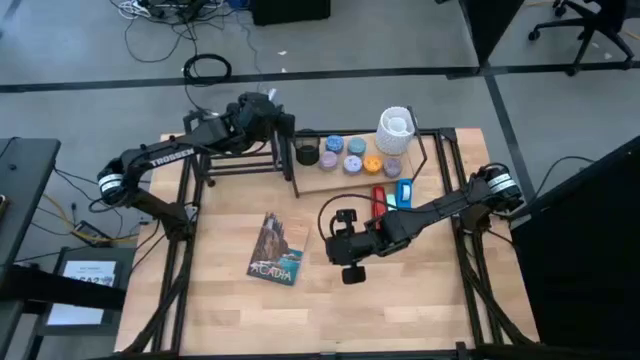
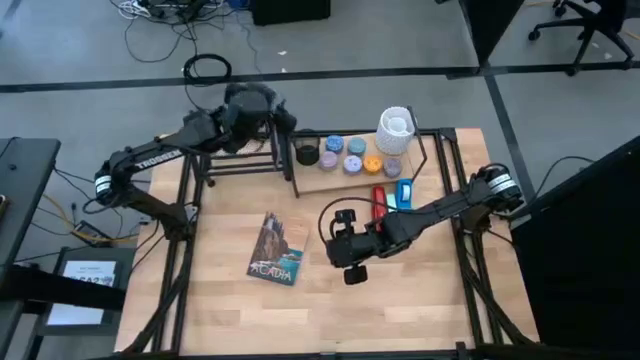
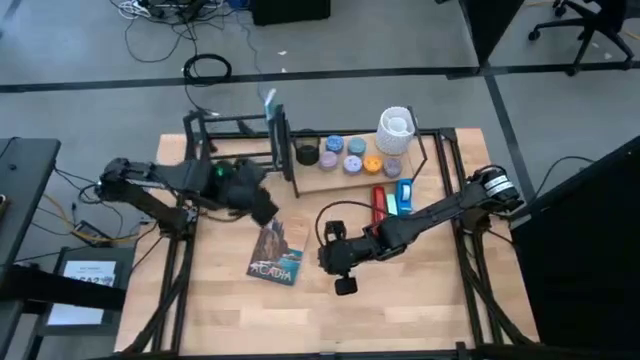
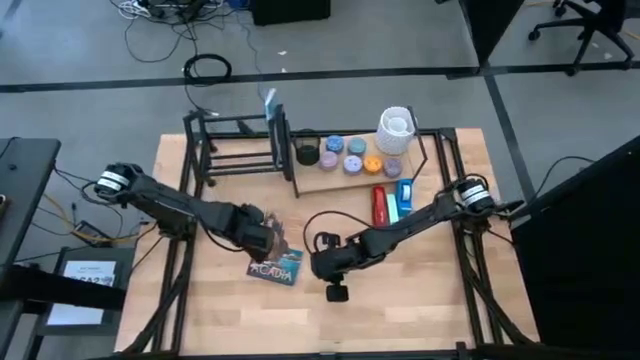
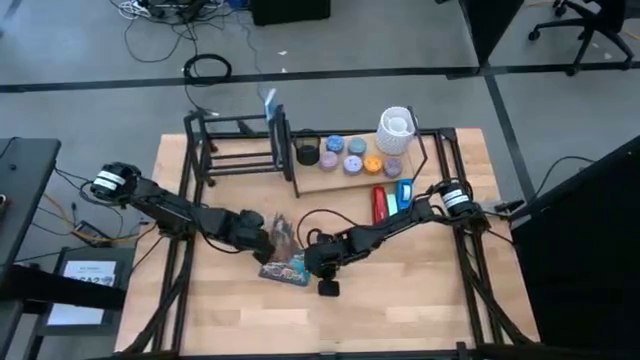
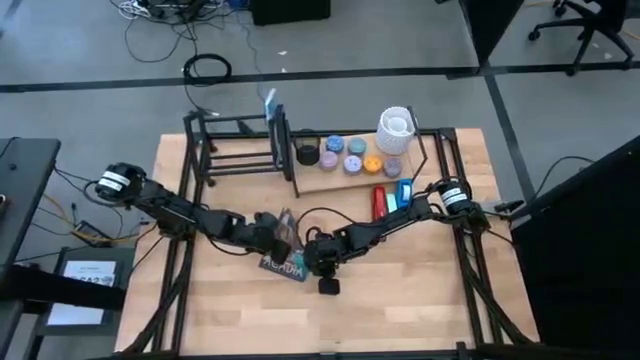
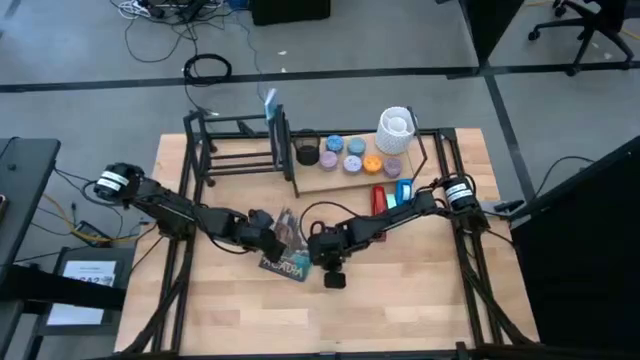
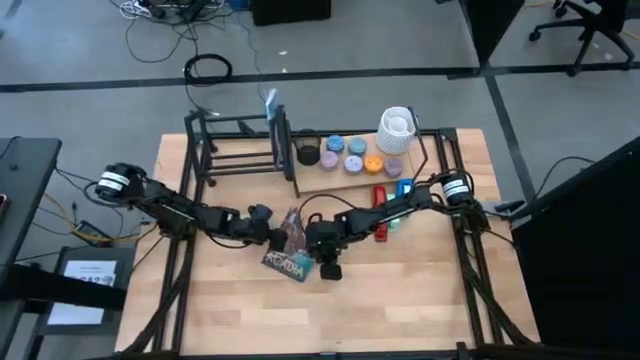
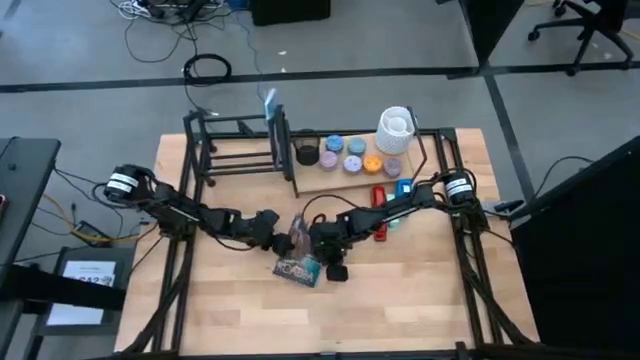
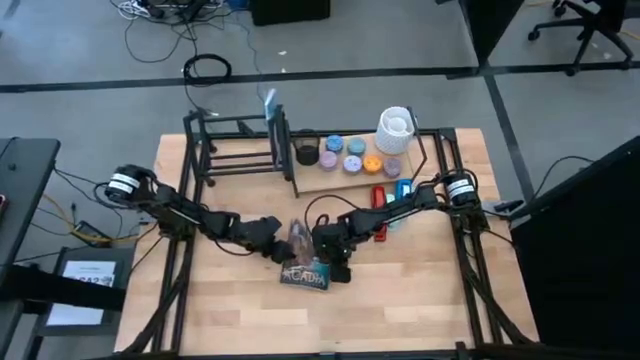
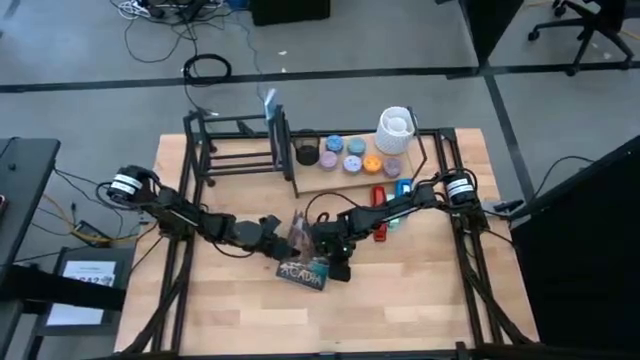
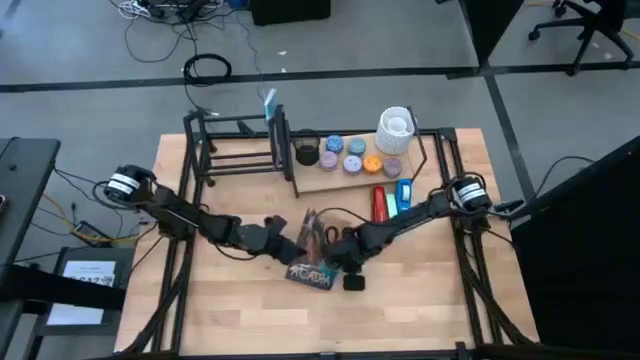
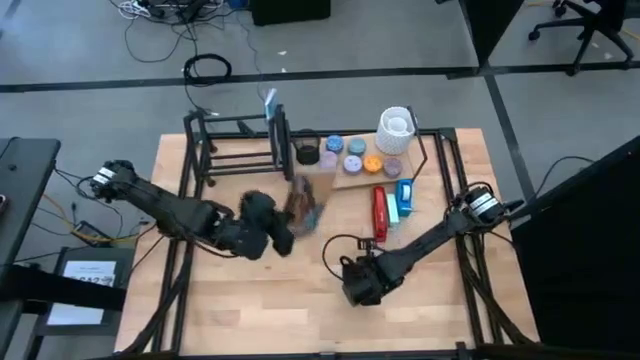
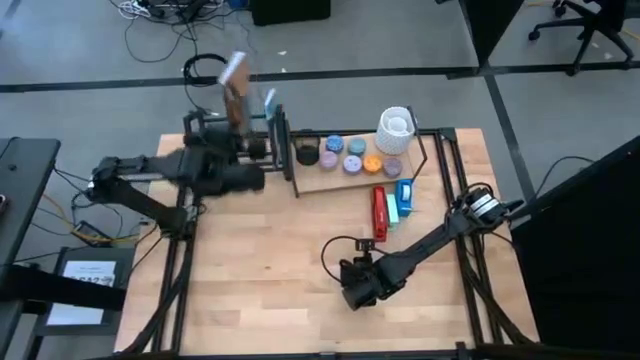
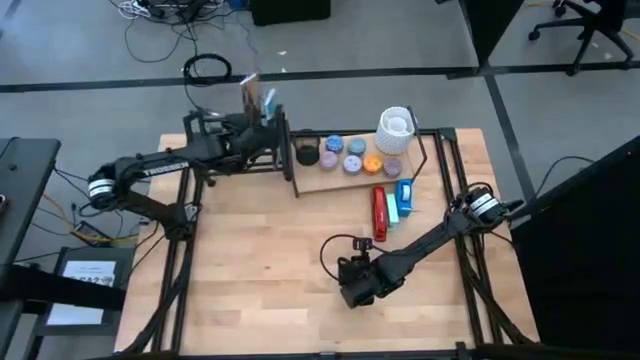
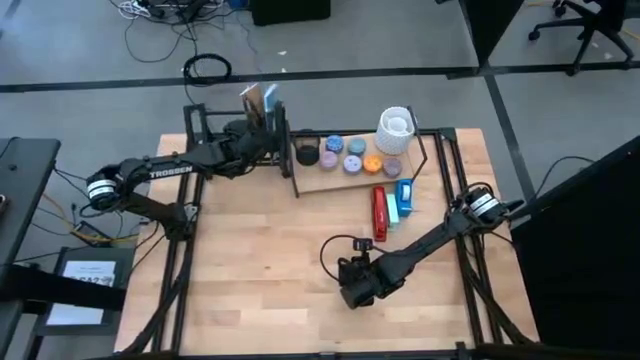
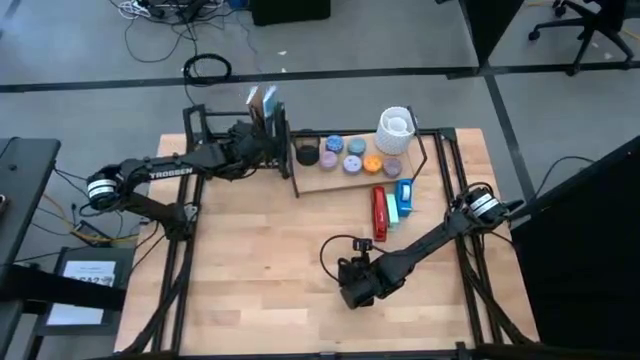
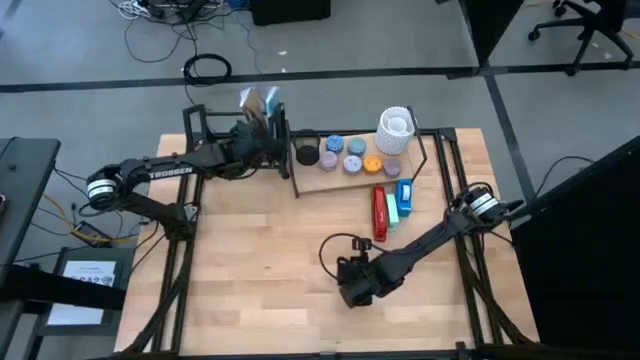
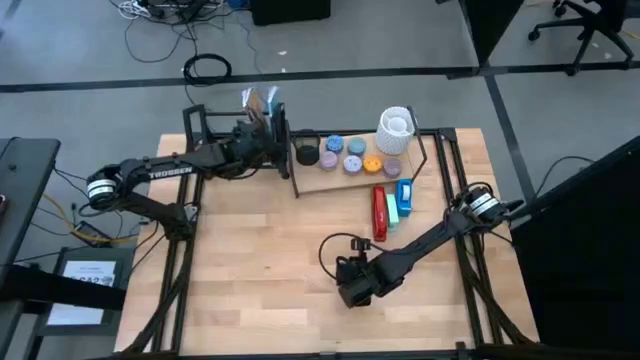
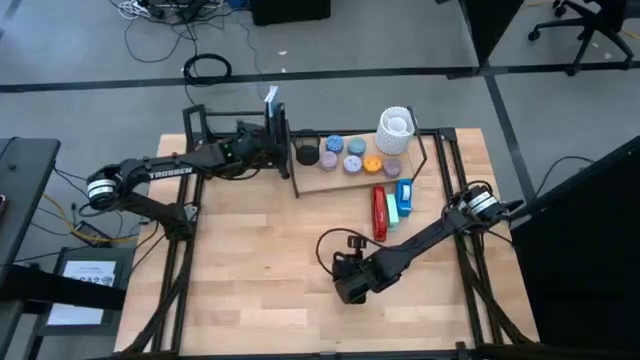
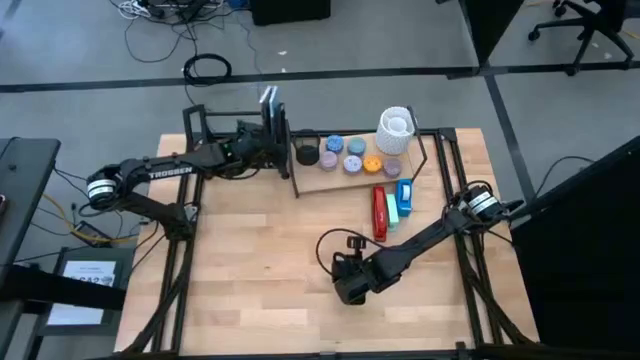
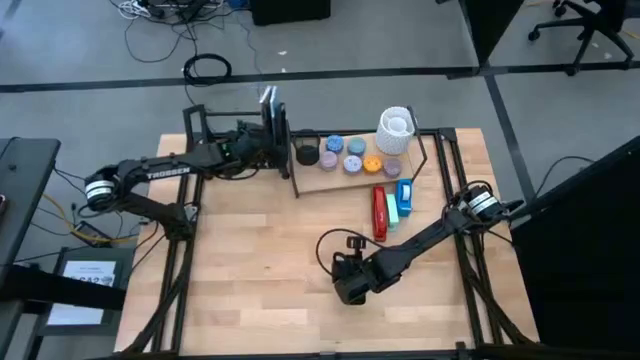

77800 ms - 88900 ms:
Task: Stock shelves
Put the brown book on the bookshelf

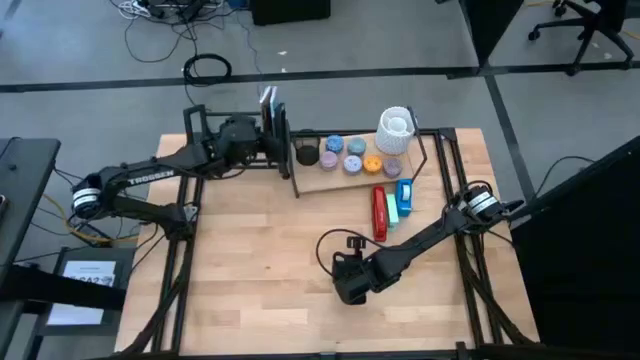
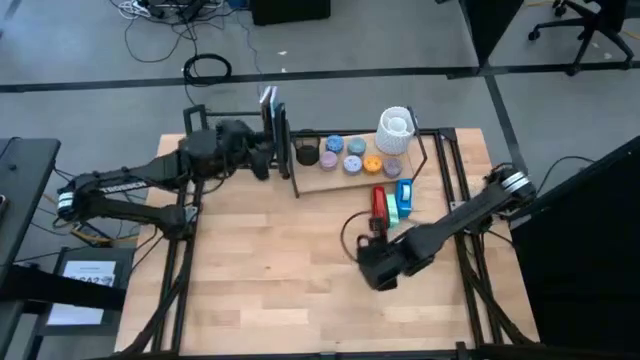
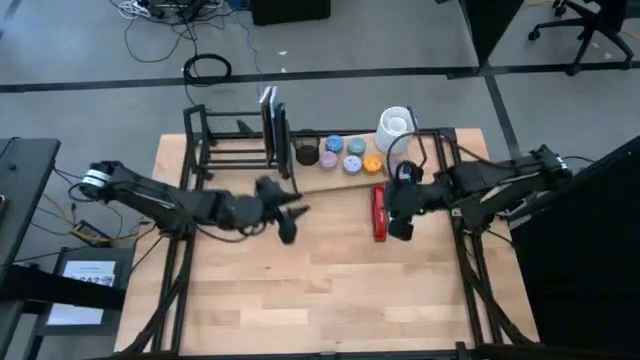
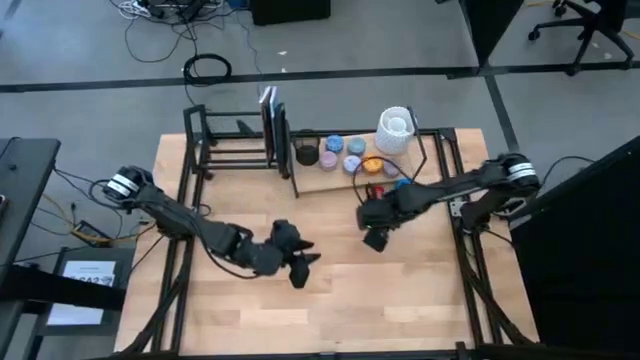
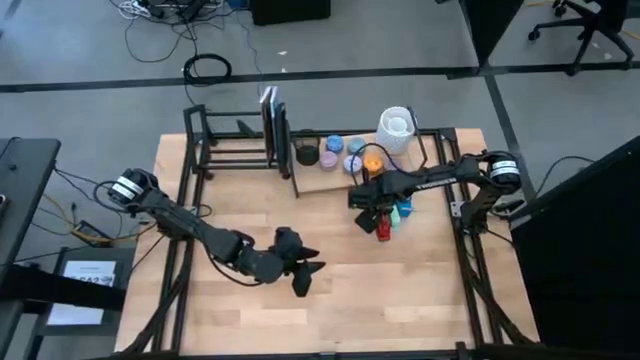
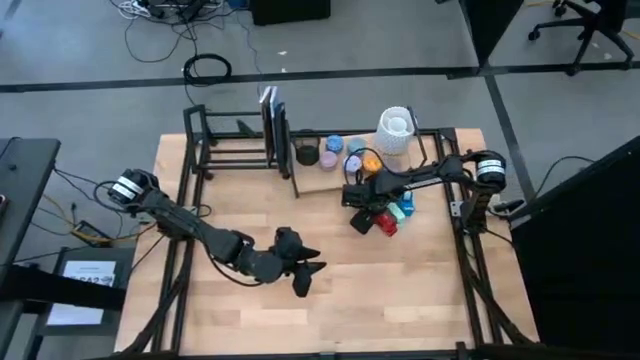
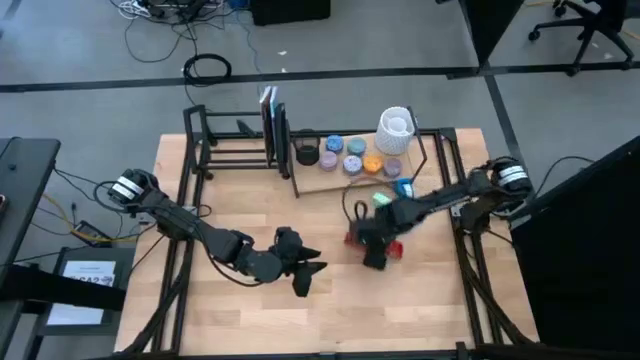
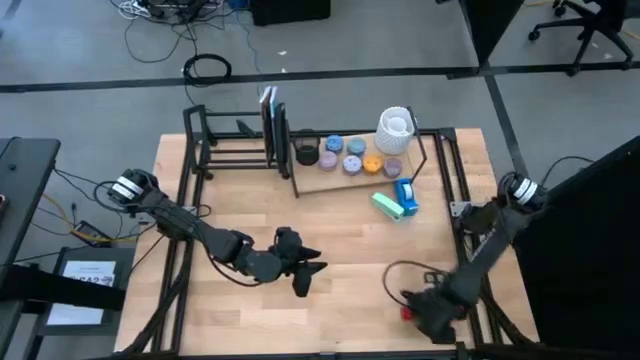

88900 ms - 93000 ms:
Move the red stapler to the bottom right of the table

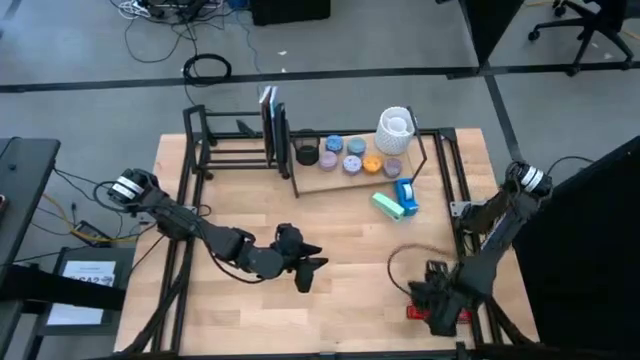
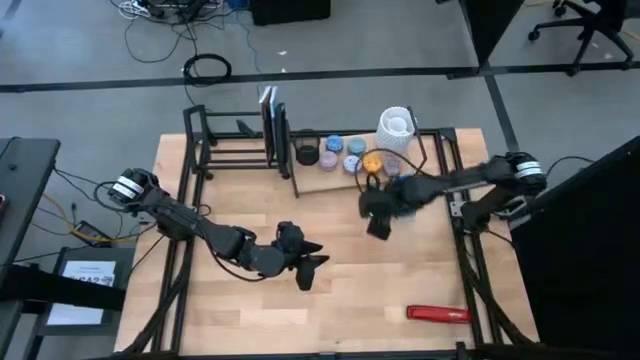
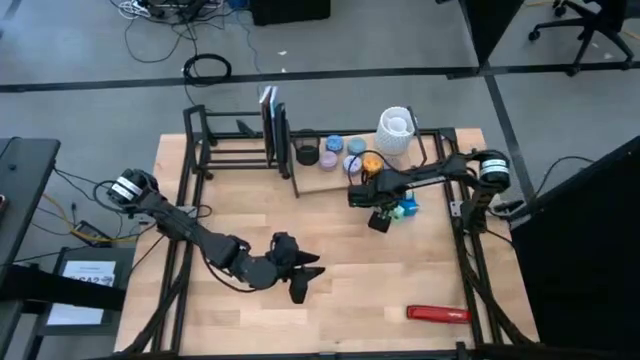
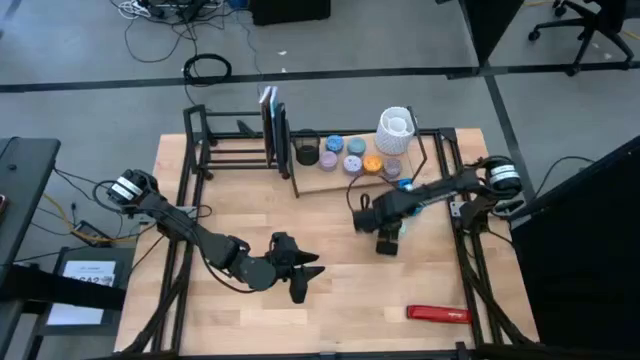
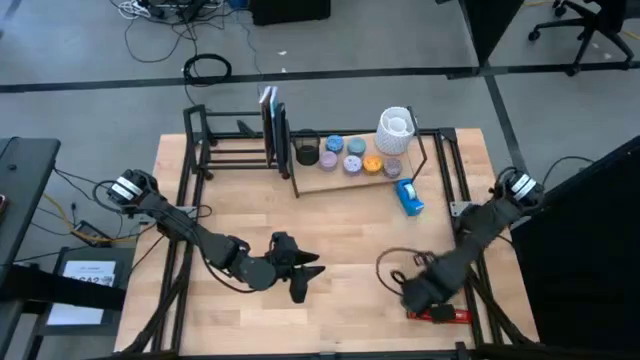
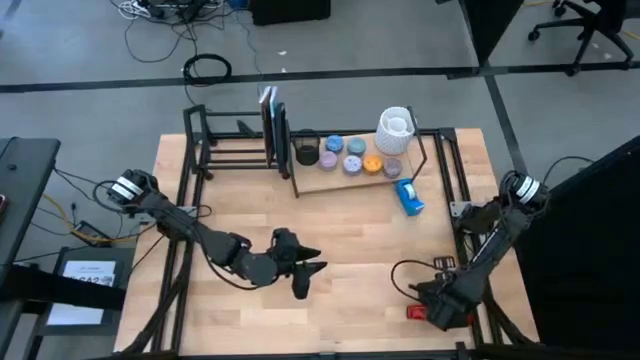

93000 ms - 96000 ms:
Move the light blue stapler to the bottom right of the table

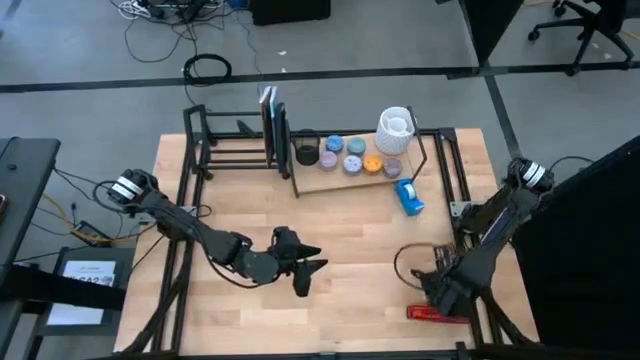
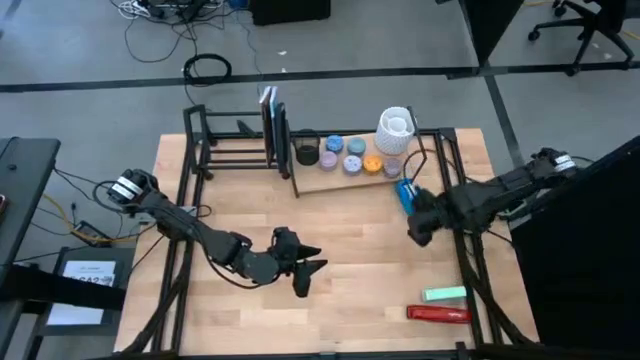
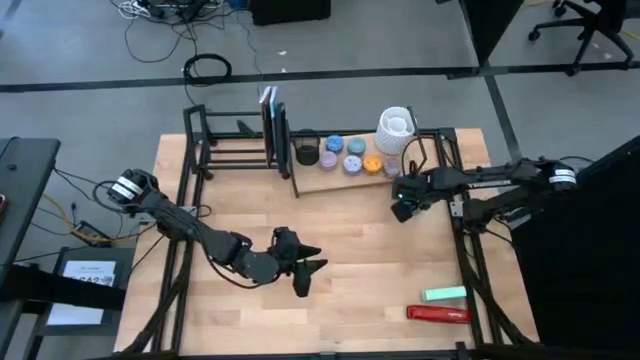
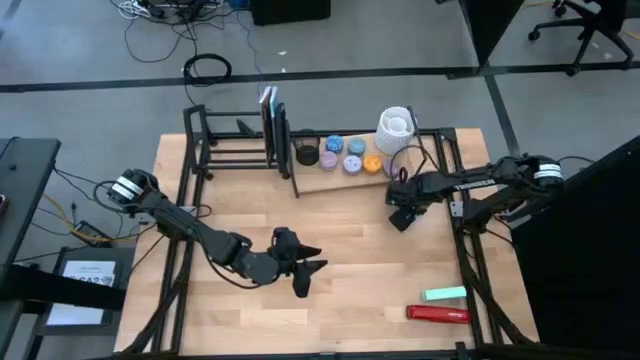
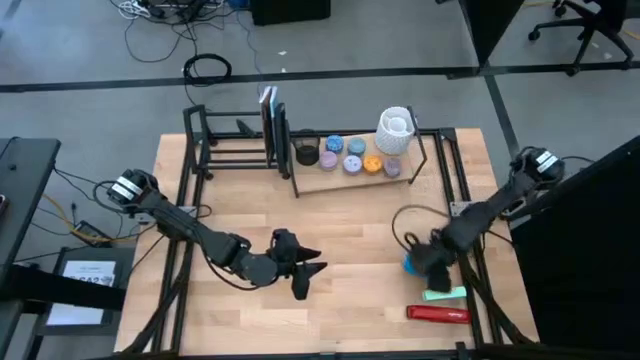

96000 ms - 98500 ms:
Move the blue tape dispenser to the bottom right of the table
